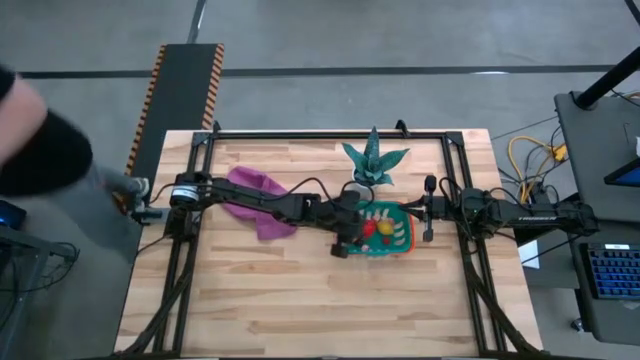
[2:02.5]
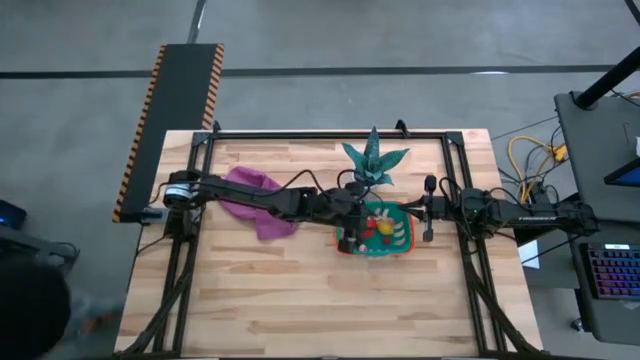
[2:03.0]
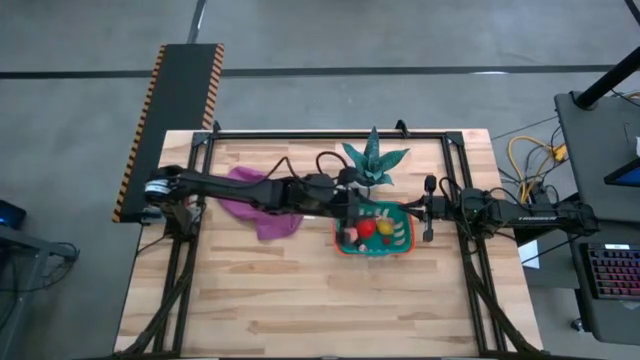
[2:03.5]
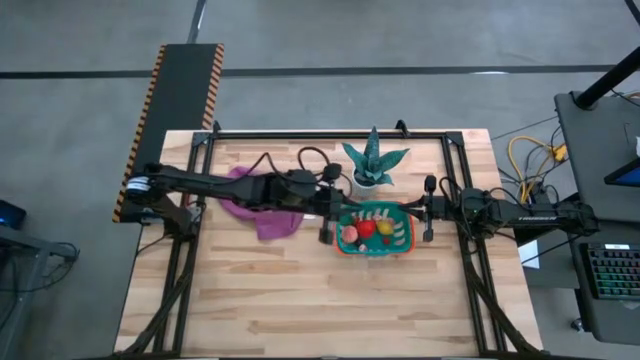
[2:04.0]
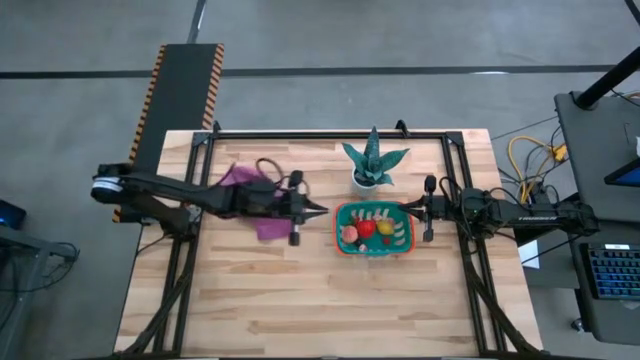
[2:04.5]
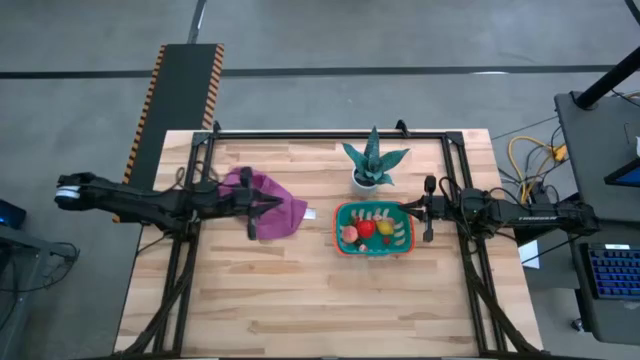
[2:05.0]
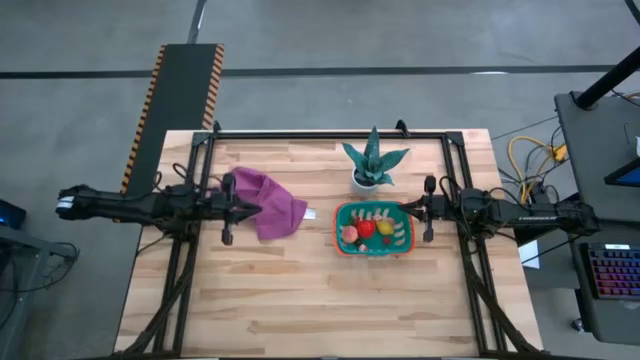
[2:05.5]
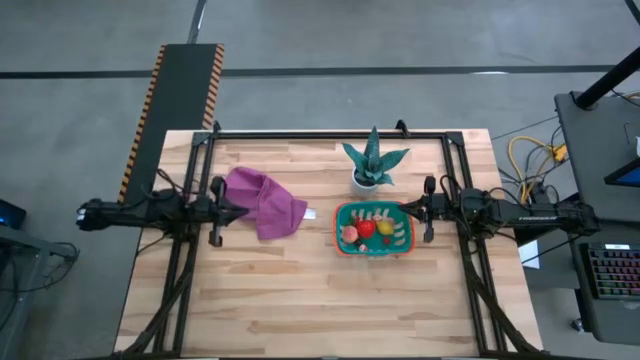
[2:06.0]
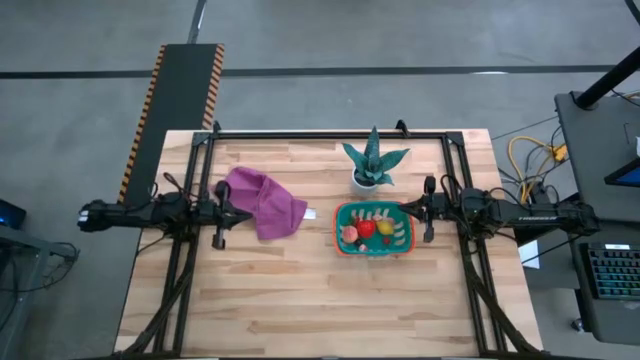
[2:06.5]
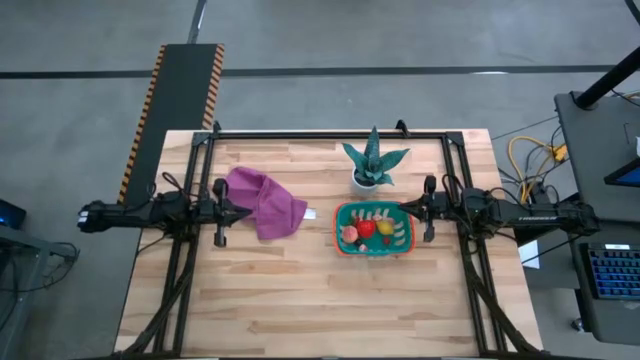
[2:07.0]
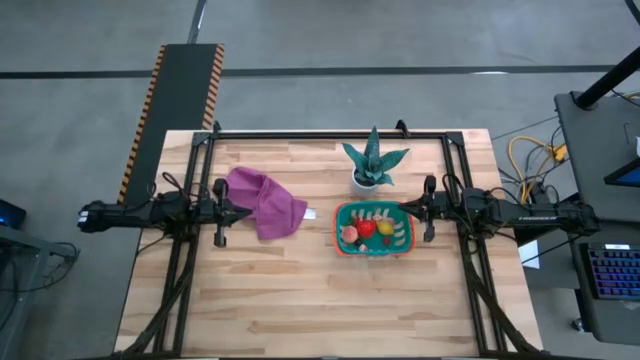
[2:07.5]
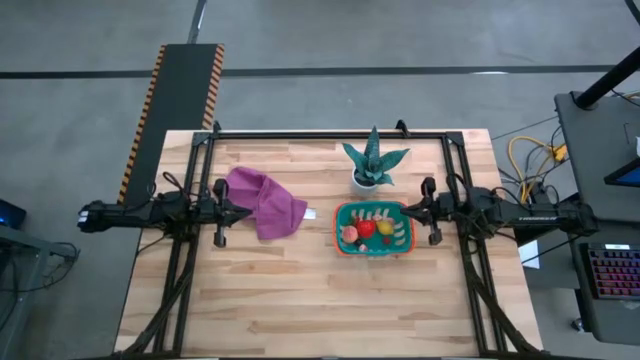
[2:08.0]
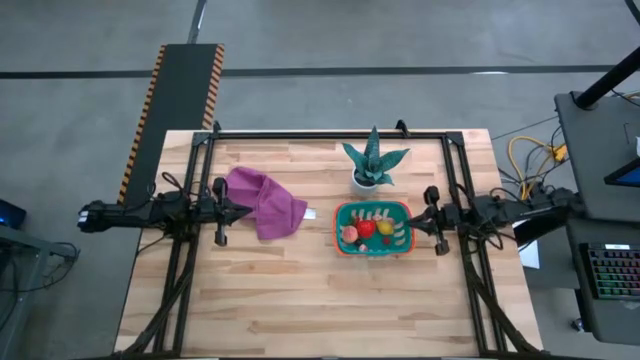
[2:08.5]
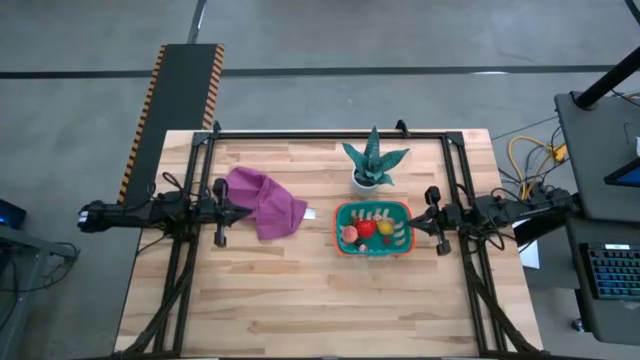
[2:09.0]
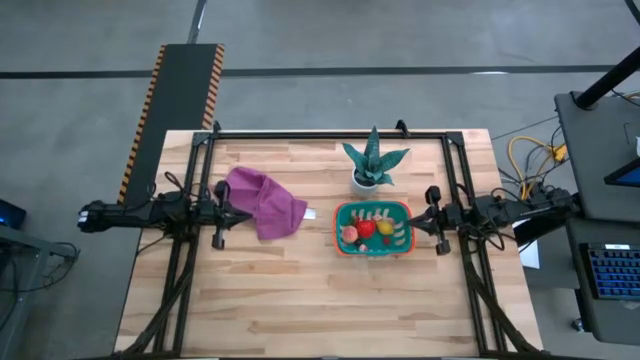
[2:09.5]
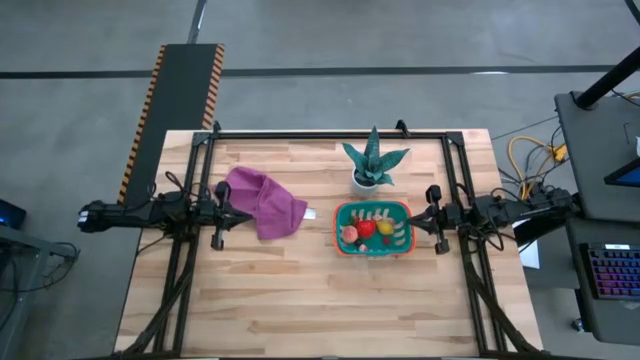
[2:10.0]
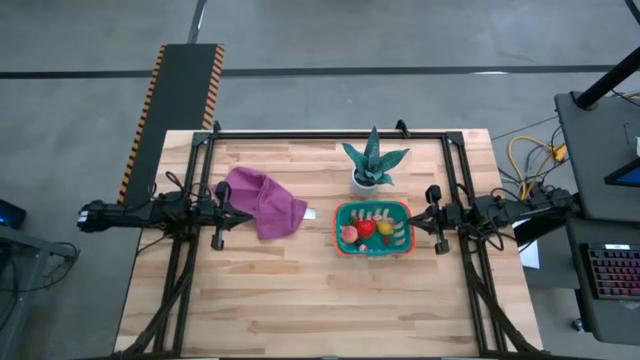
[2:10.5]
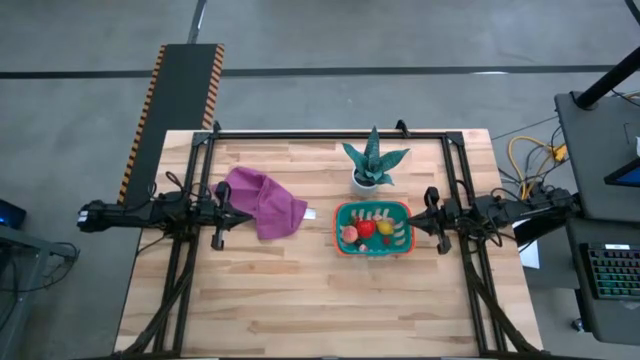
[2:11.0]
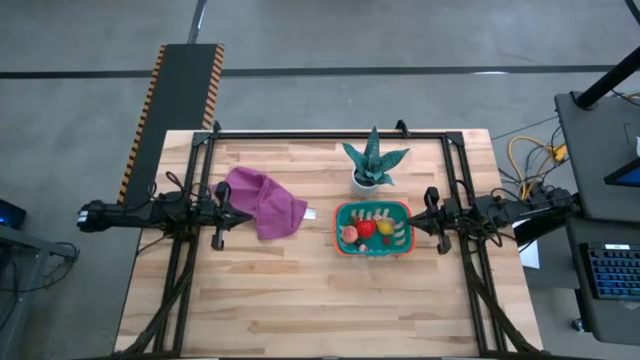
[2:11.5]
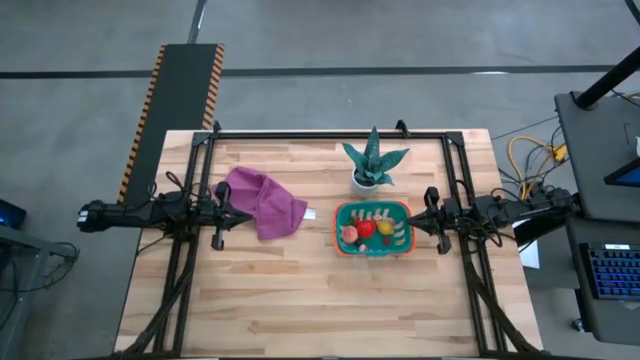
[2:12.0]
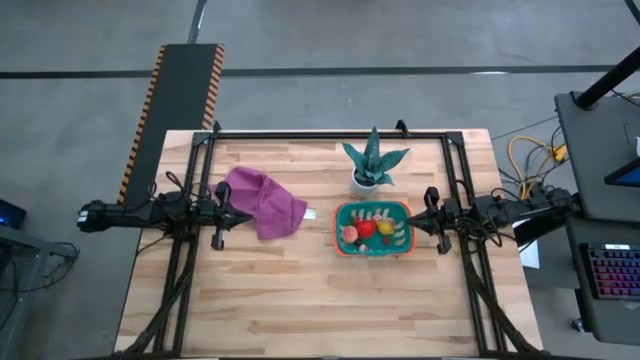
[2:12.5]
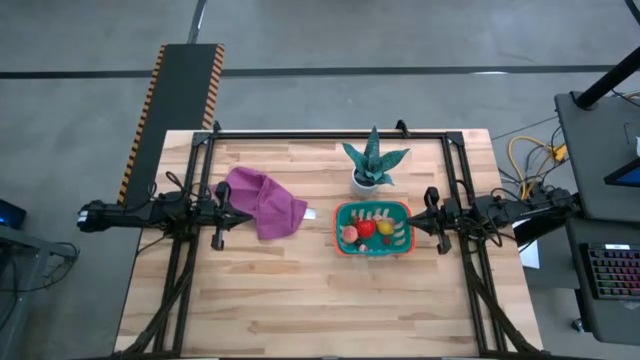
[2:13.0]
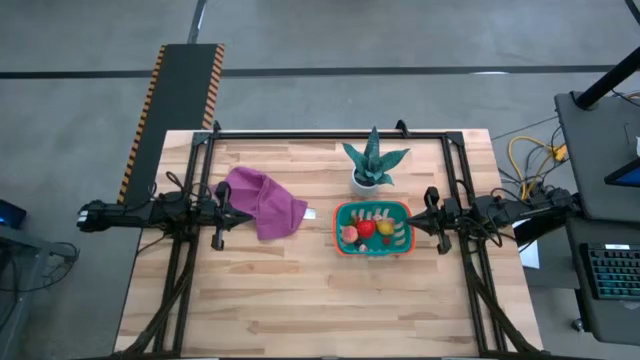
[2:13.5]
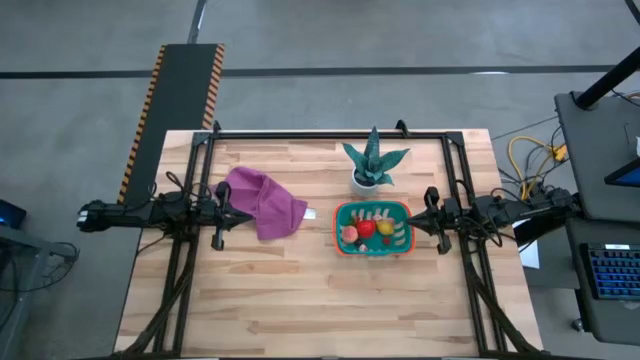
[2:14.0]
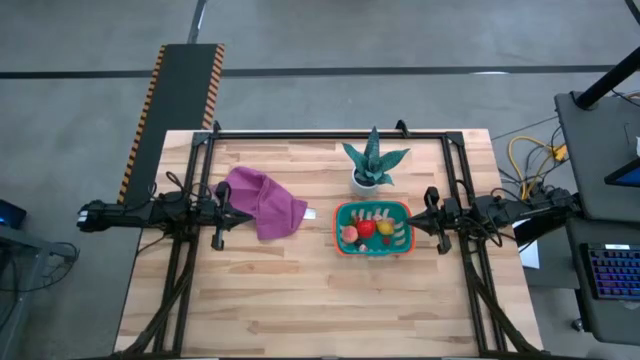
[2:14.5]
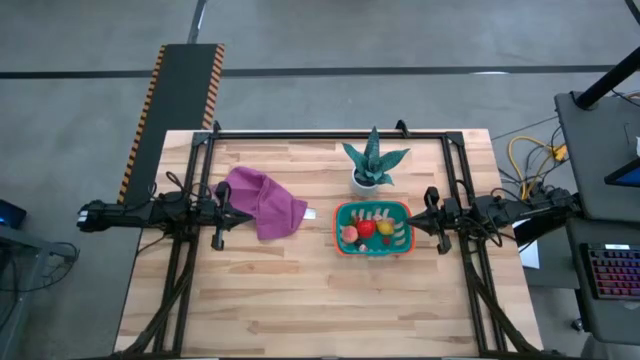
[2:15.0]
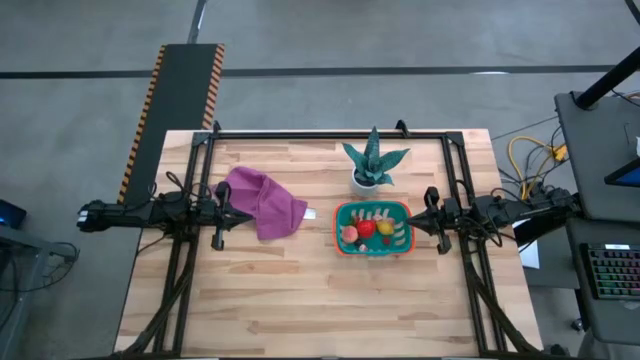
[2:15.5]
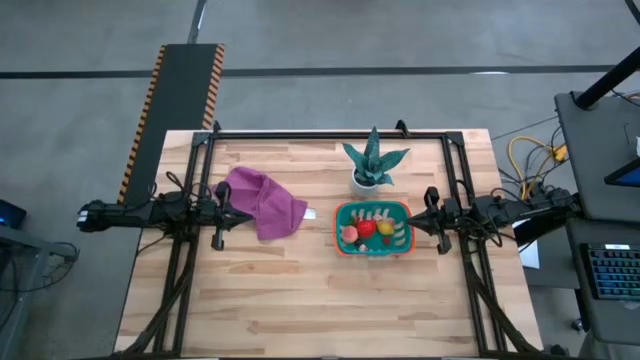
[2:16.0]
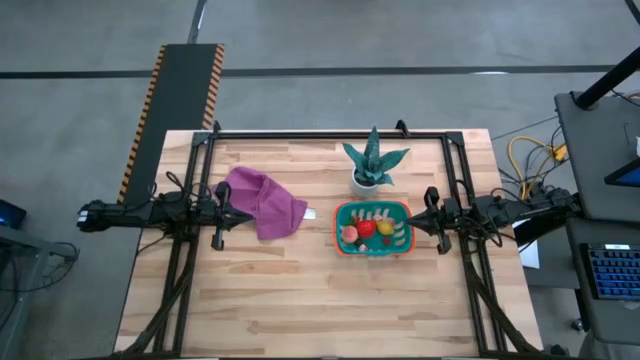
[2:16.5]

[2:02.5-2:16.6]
Task: Pick and placing Produce into tupperware
Return to Home Position

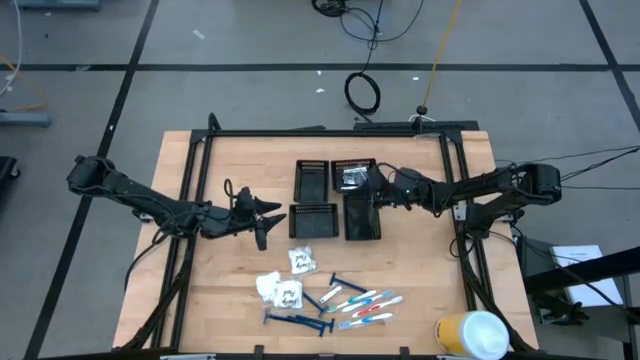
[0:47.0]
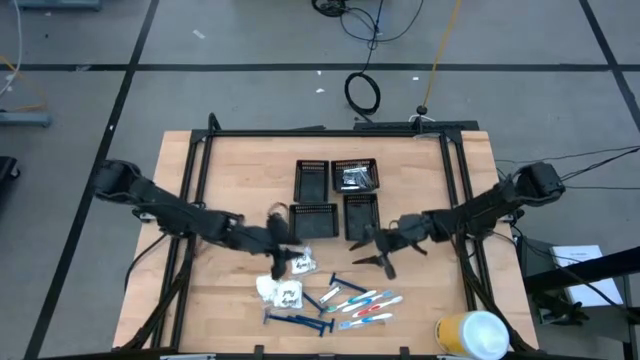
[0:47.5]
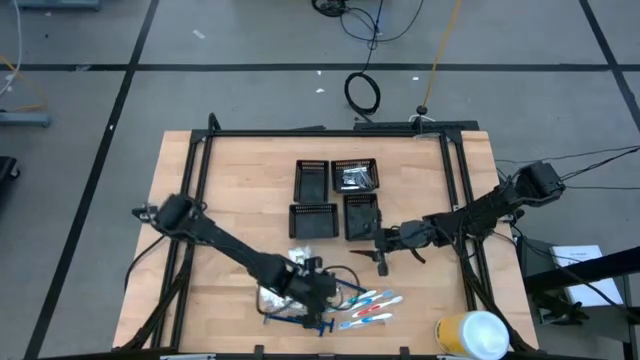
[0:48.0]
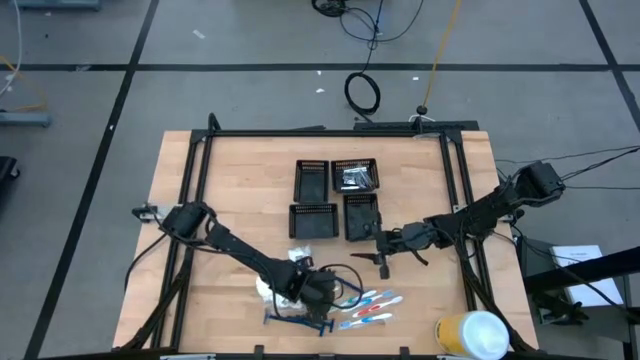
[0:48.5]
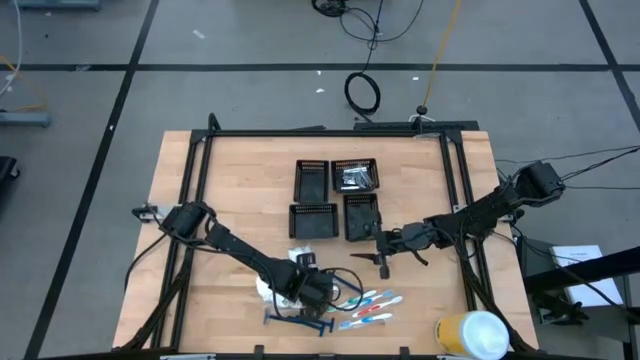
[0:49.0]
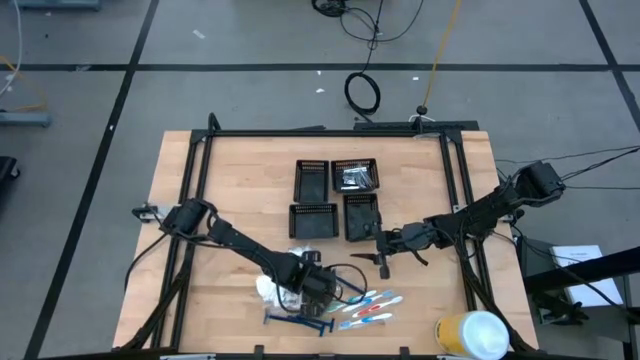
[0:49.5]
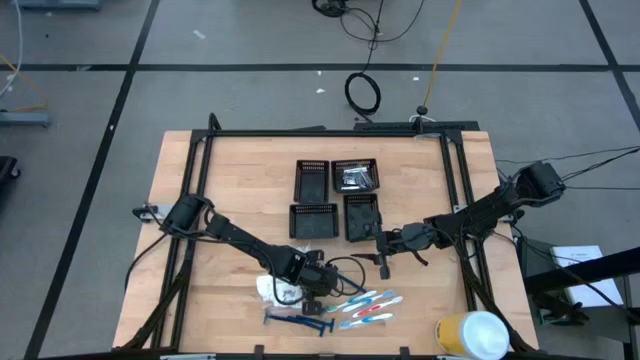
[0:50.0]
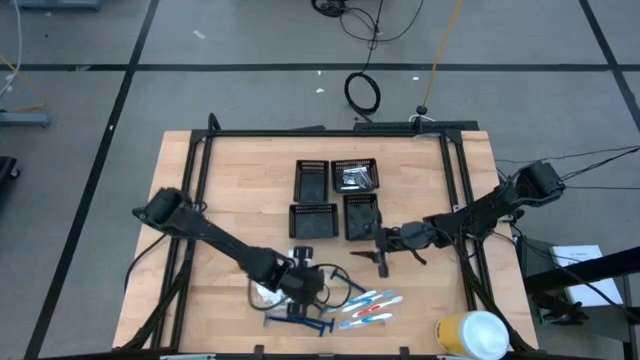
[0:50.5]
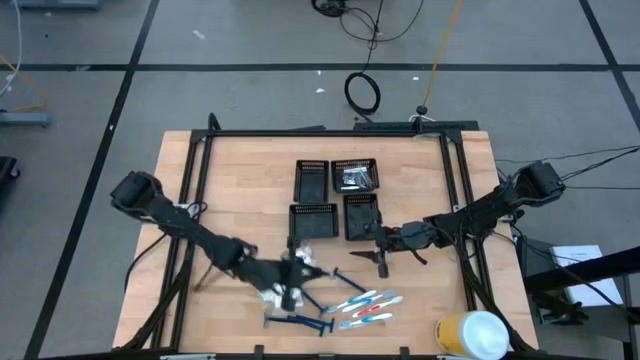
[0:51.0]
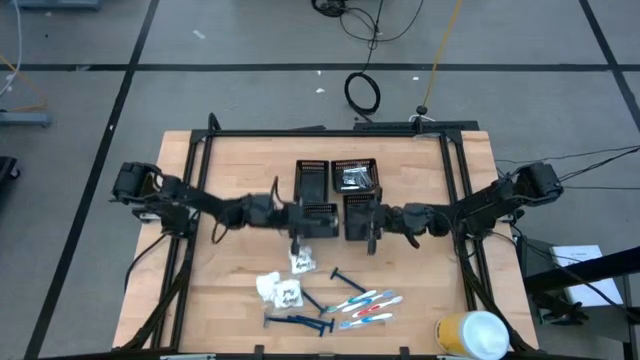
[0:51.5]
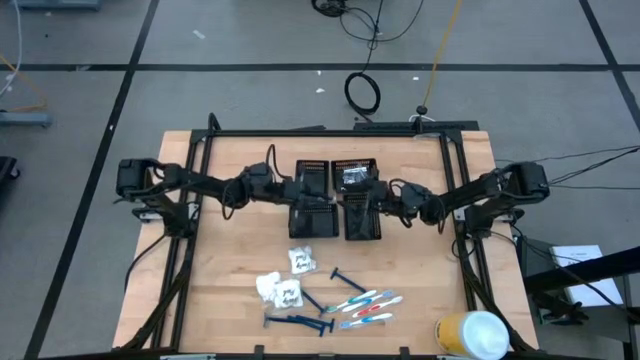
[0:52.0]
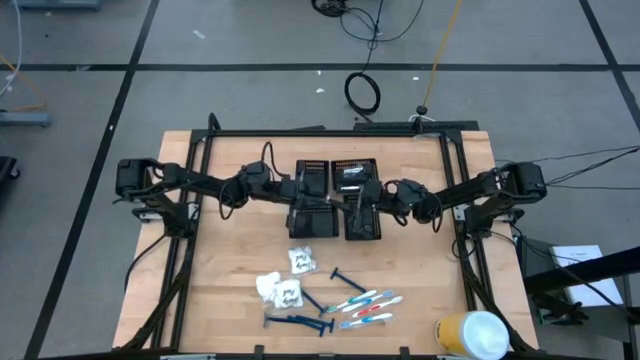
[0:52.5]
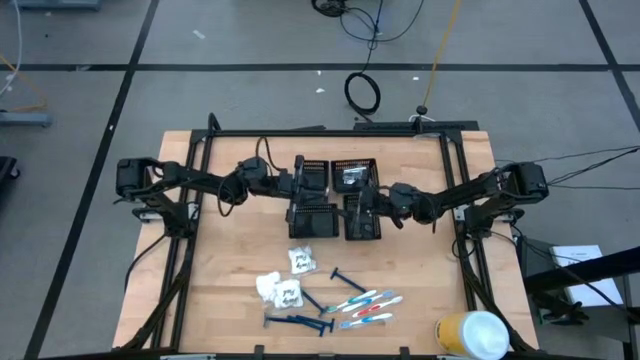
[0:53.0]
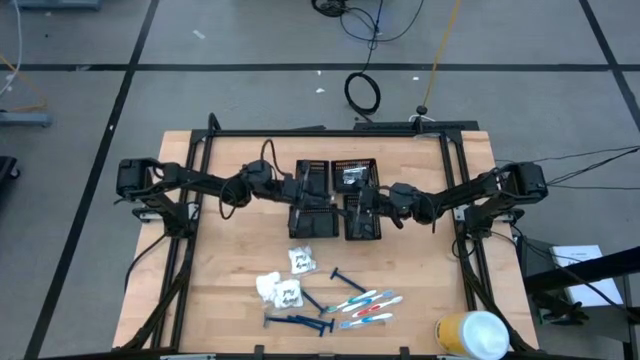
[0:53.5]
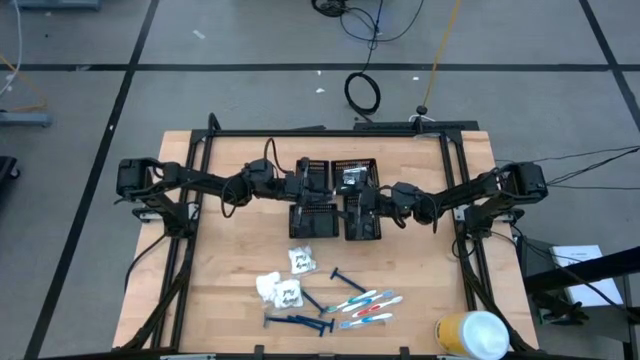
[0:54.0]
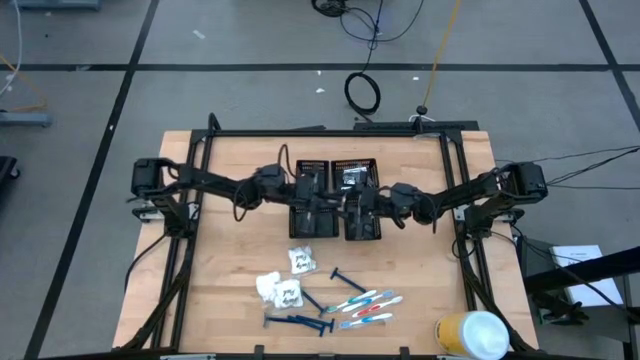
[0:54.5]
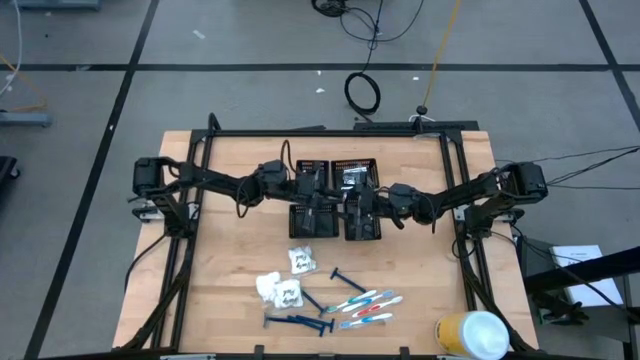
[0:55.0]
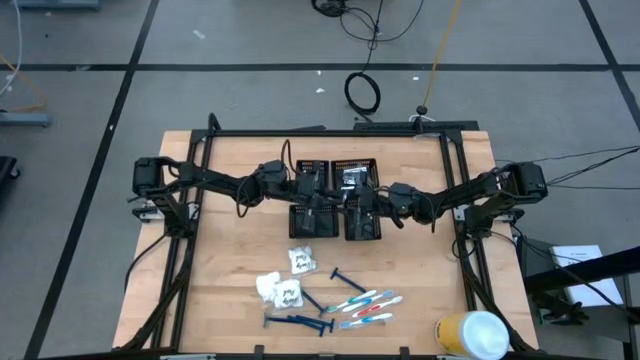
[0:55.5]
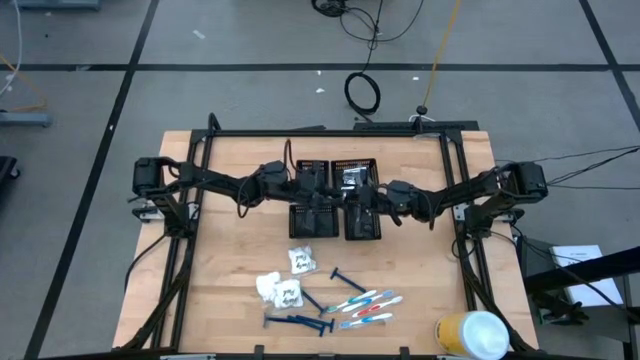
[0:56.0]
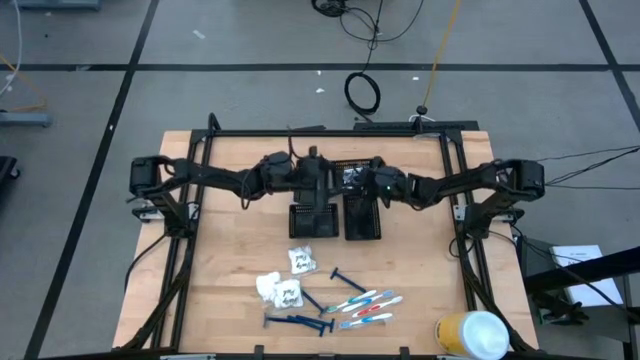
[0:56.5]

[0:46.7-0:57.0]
Task: Pick & Place Travel size toiletries
Put the silver nail cutter into the top right black bin
